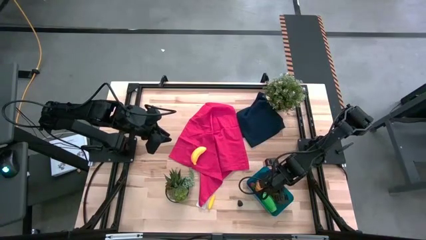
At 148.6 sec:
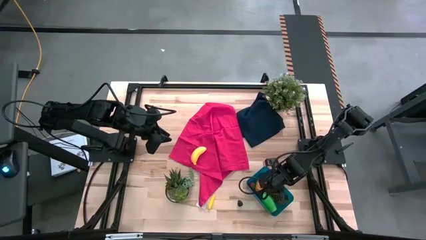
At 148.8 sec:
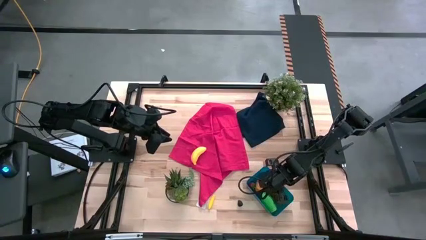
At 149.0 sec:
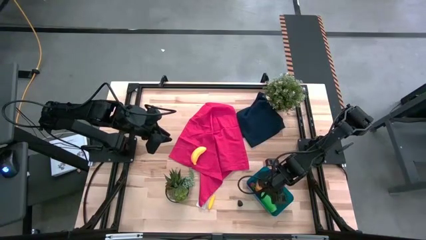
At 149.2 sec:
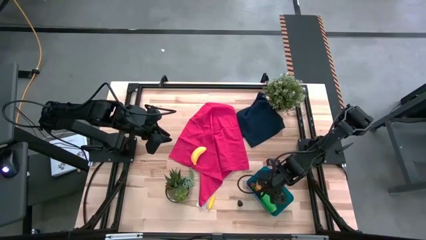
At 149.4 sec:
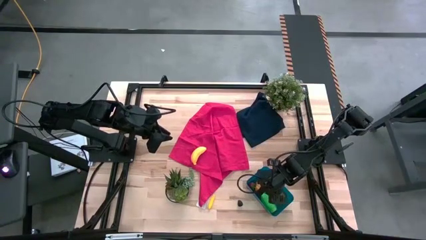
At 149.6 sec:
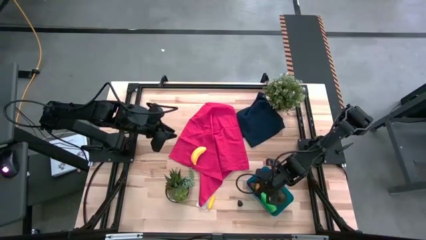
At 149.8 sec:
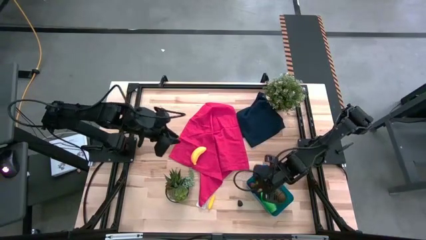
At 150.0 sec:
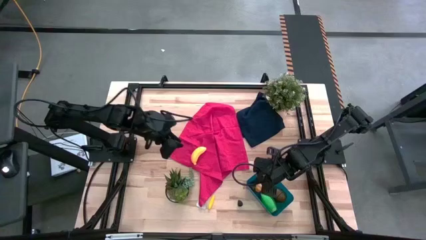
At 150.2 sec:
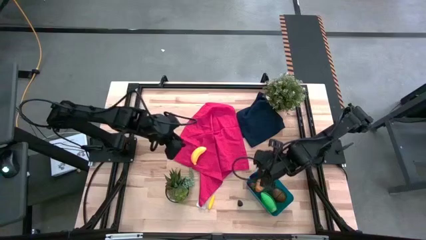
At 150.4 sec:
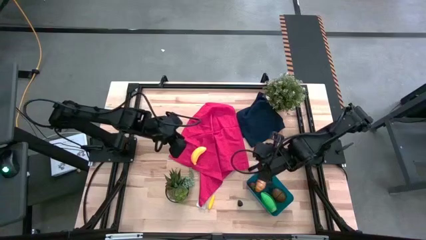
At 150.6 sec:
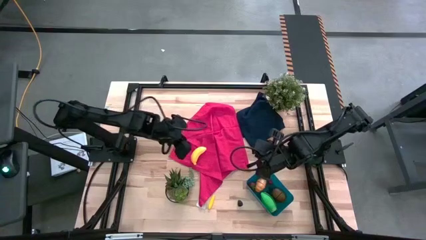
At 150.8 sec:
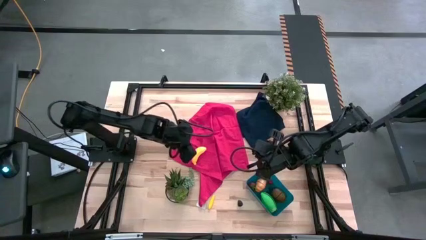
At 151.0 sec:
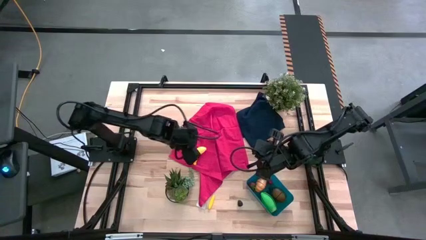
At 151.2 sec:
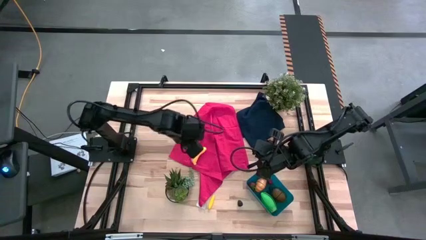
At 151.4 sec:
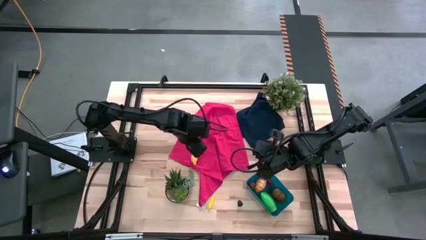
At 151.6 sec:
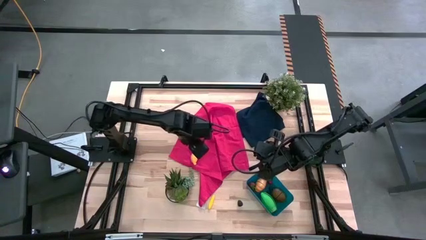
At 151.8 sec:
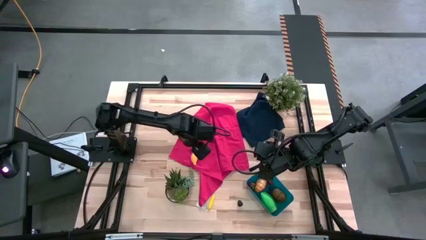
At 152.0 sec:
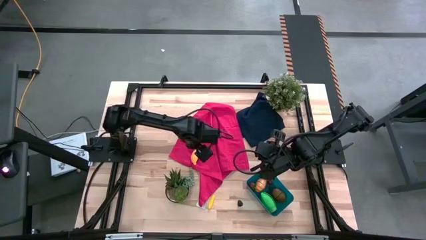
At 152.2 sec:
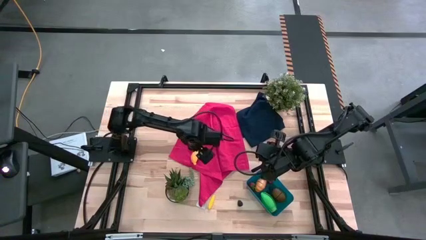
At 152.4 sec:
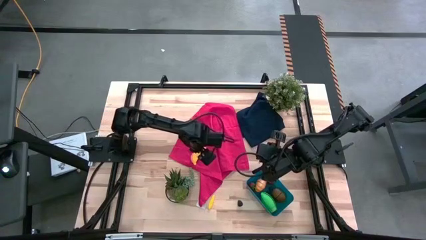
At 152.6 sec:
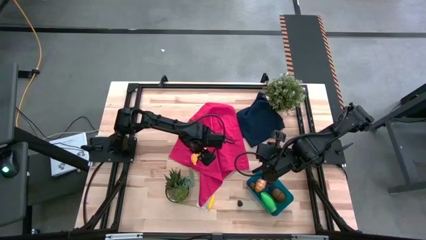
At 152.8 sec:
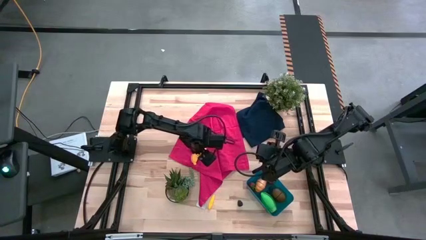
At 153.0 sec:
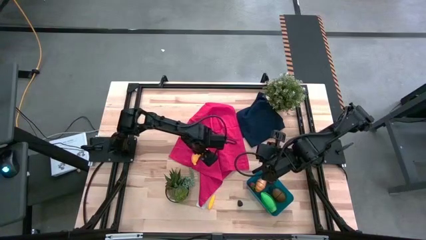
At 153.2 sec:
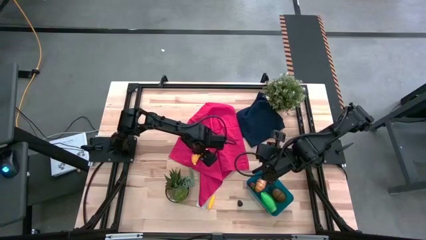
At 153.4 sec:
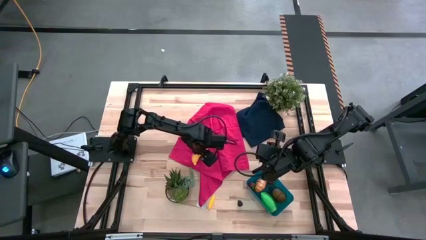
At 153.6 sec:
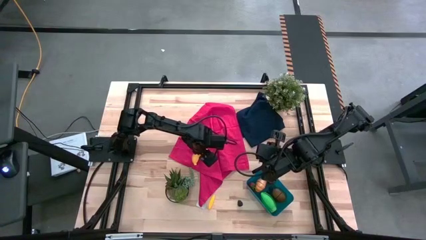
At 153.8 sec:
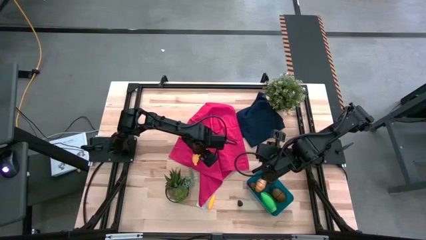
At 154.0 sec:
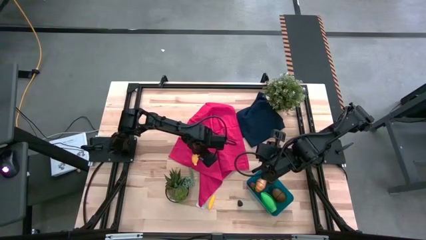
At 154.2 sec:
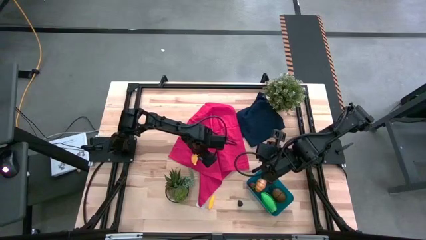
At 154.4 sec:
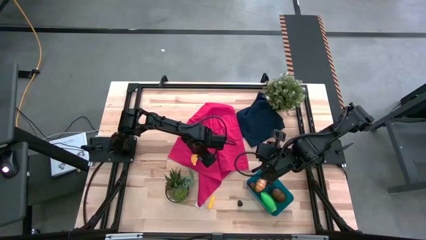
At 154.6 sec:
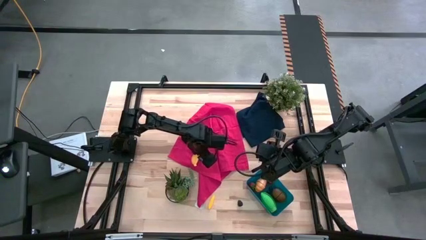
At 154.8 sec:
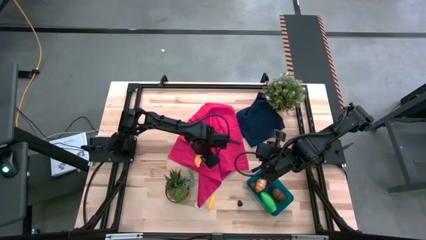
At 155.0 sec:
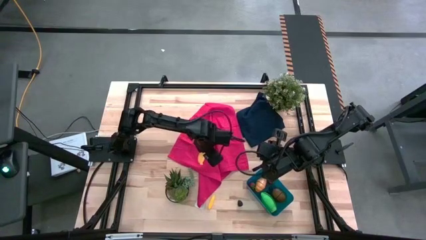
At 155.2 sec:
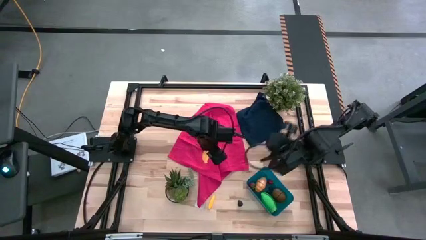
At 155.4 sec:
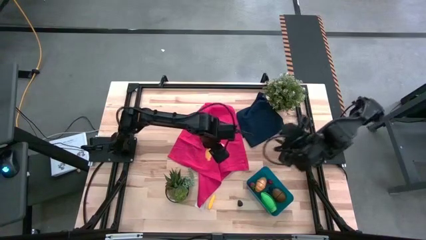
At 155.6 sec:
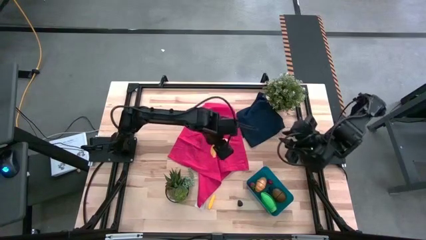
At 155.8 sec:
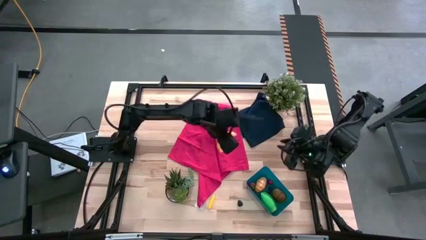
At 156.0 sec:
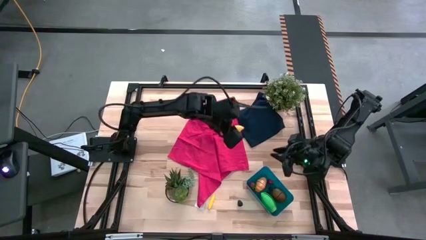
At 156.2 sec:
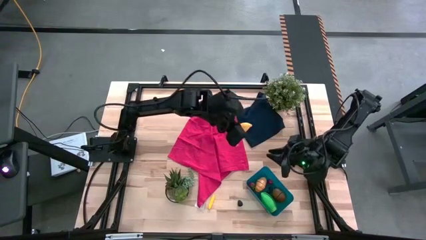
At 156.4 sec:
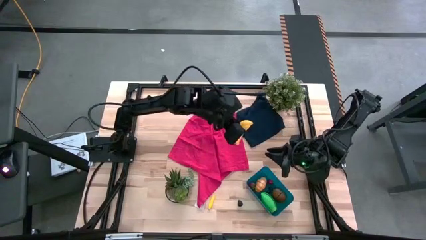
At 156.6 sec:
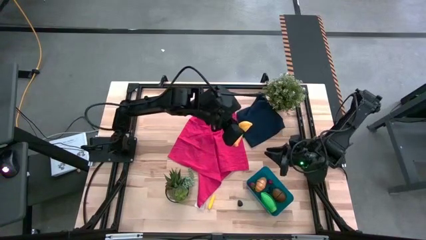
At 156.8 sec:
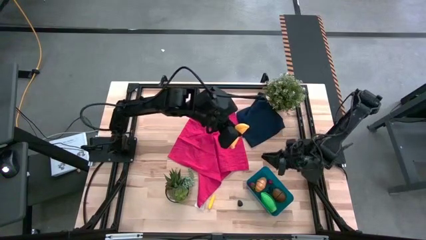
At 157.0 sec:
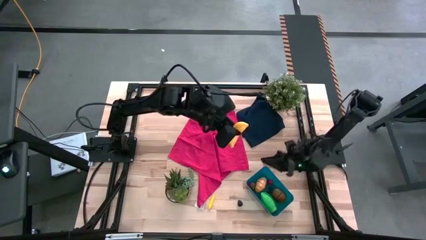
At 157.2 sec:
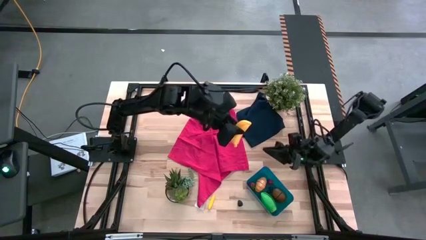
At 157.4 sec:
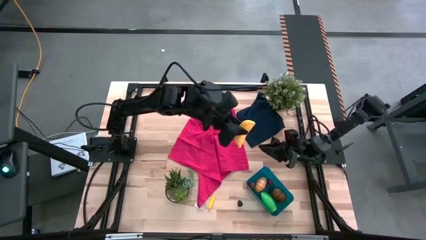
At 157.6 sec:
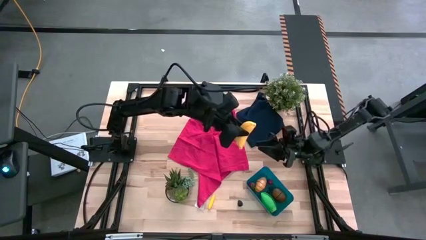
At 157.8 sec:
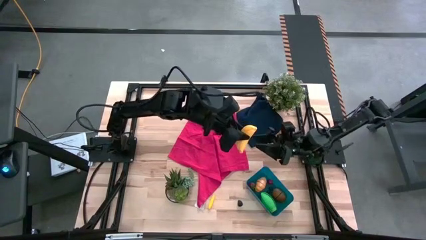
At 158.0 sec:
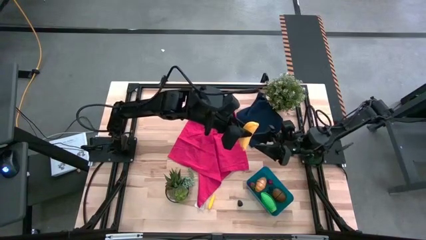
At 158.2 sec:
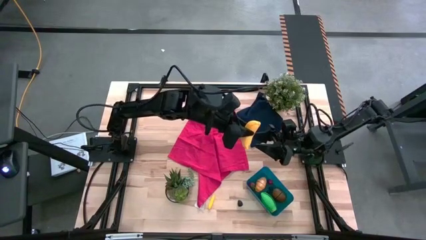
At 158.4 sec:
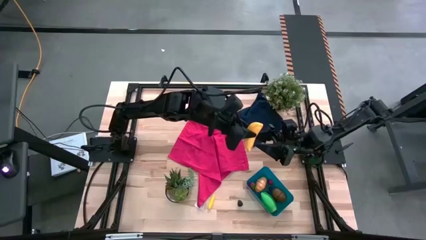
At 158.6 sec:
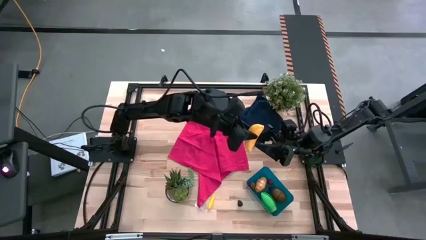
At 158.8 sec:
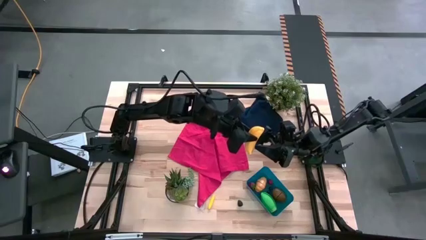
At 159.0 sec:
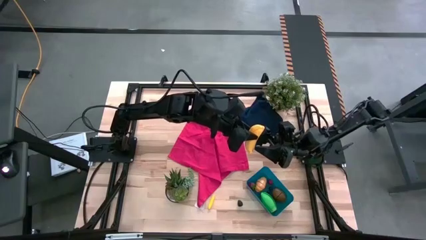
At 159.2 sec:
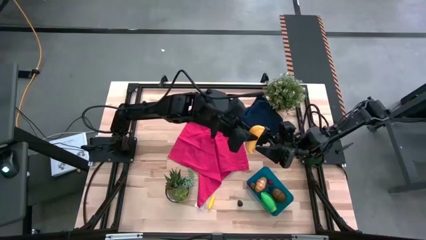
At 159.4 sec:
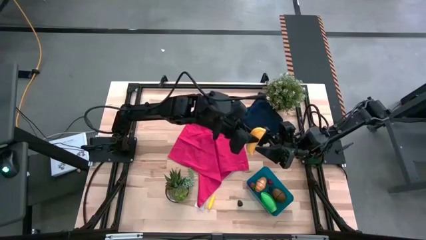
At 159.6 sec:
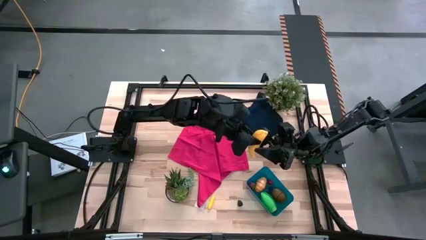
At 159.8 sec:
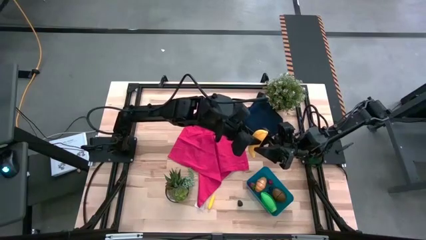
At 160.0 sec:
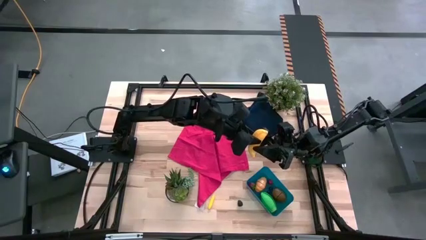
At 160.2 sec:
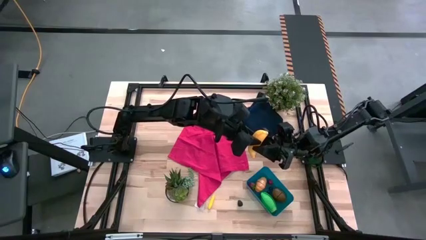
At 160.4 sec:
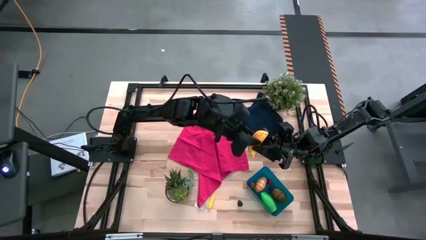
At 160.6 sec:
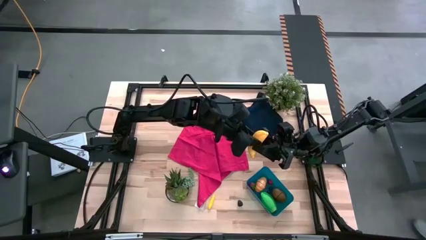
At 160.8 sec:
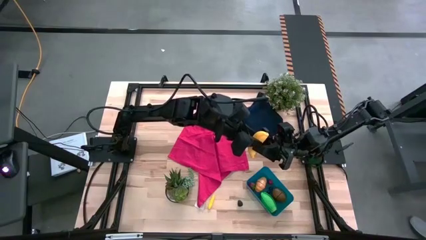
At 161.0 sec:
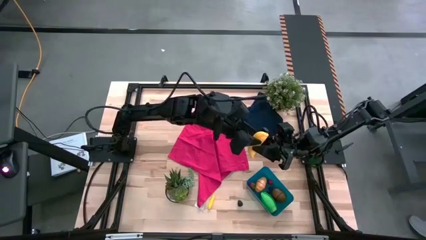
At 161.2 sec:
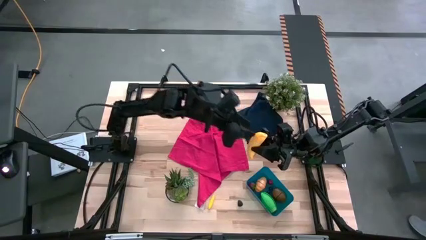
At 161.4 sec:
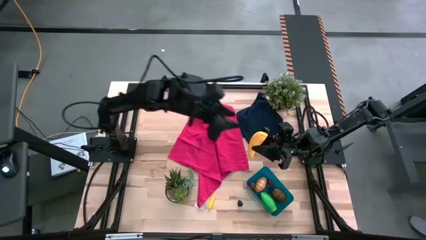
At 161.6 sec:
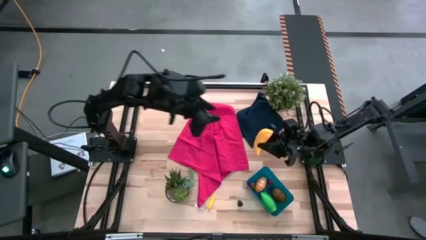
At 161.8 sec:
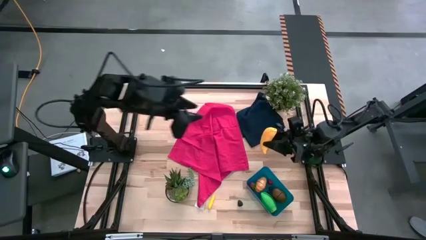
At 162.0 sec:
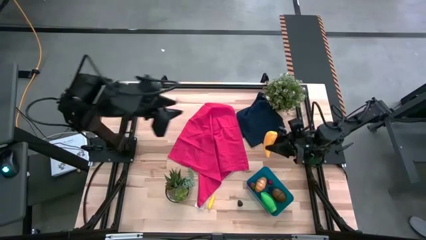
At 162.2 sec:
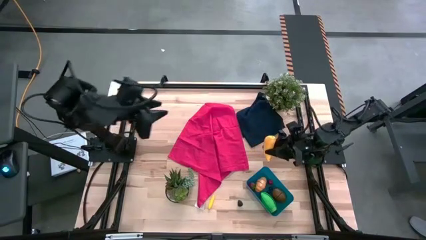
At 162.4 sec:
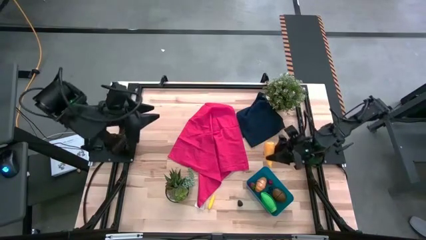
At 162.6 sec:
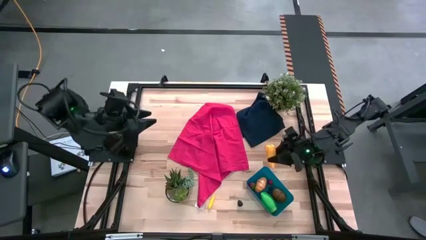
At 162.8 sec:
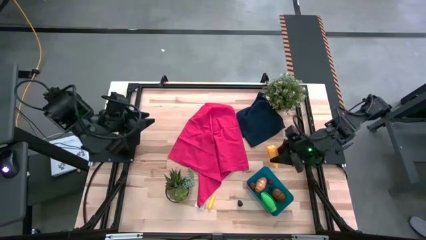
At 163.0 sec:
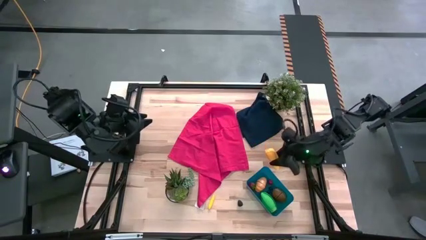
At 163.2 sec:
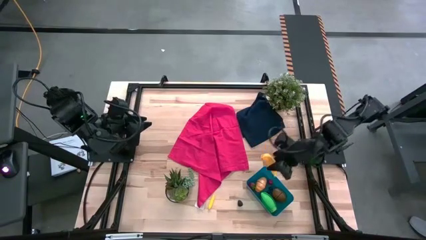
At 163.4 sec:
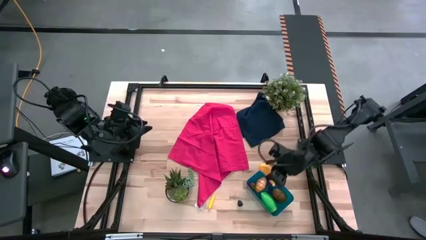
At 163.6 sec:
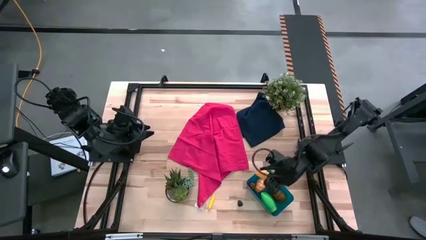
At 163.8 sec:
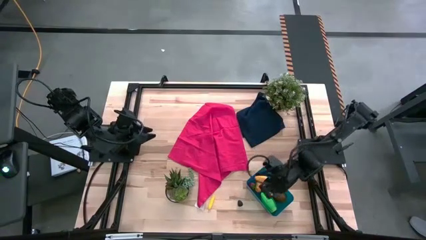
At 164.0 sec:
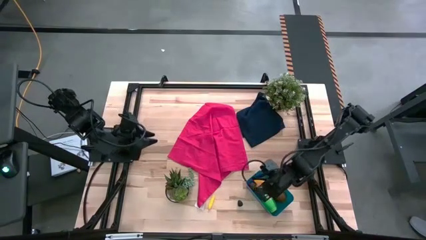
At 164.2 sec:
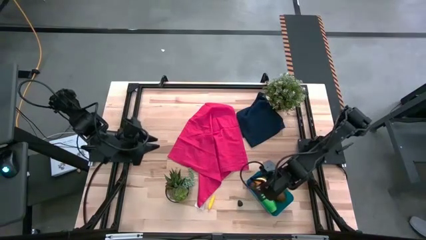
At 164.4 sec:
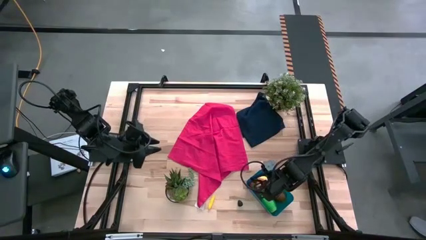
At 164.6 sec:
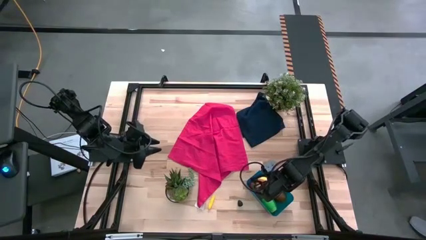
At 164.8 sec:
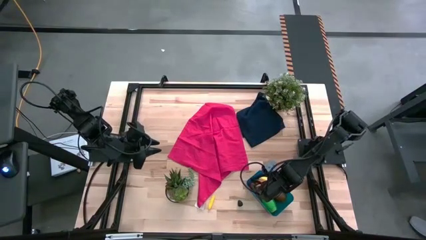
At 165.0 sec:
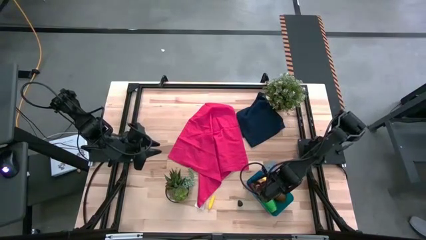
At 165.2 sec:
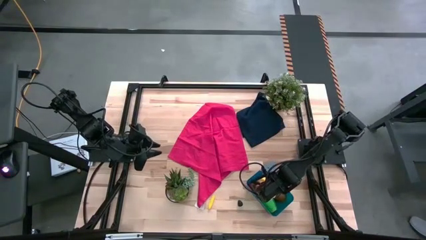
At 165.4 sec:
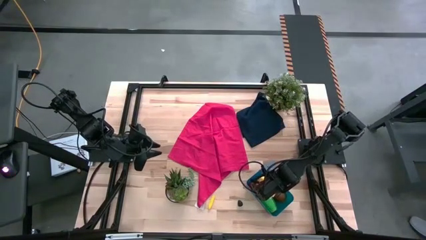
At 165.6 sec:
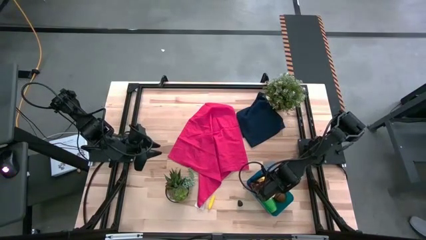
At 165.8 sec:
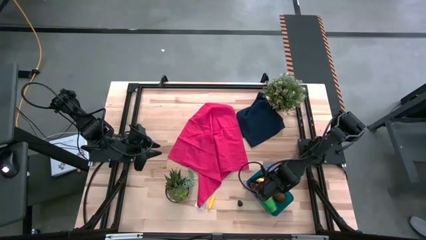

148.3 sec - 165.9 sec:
Task: Pick and placing Produce into tupperware
Put the banana into the blue bin
